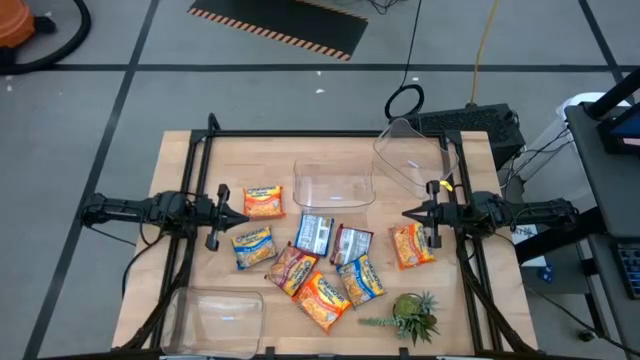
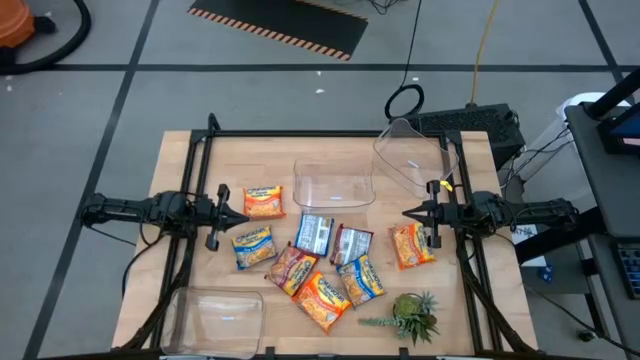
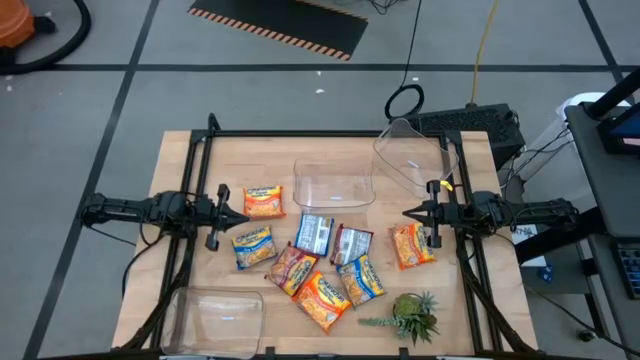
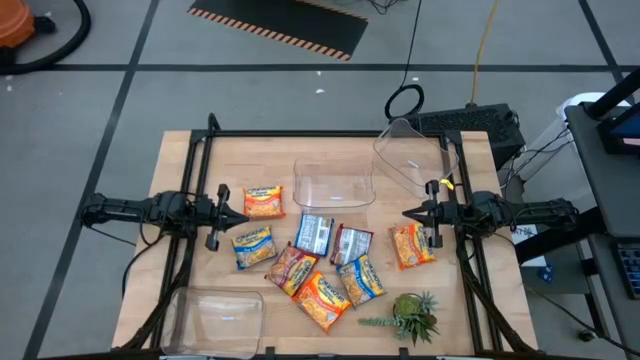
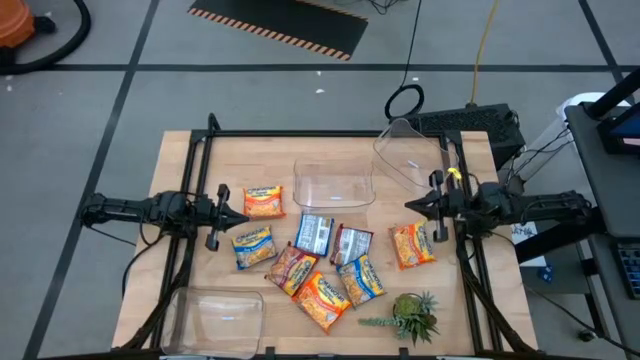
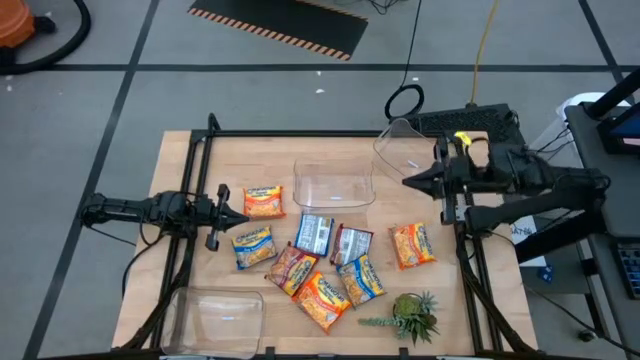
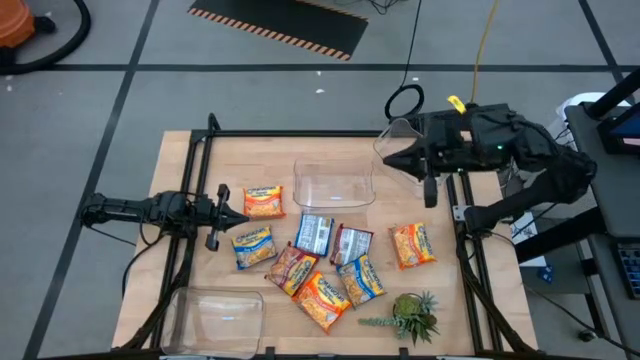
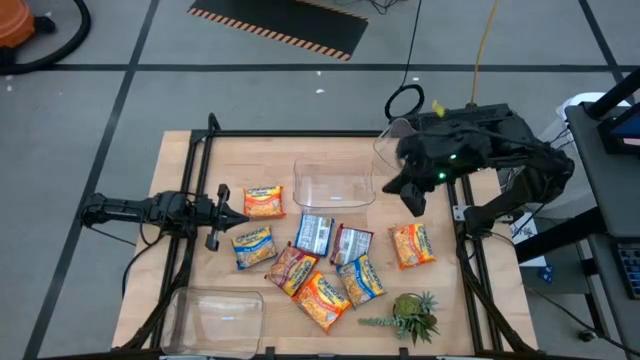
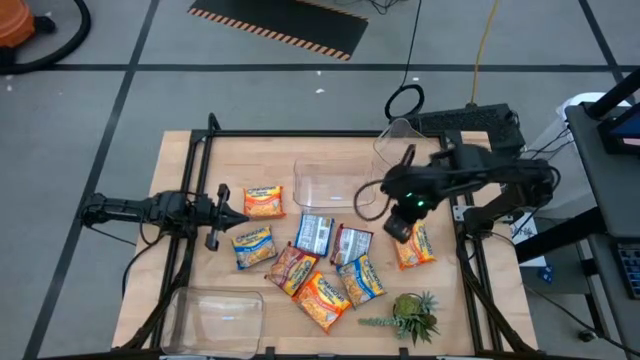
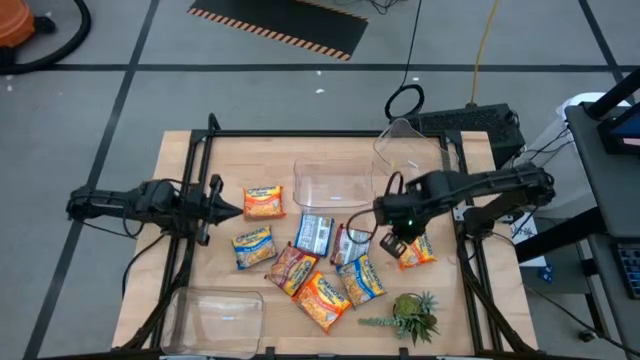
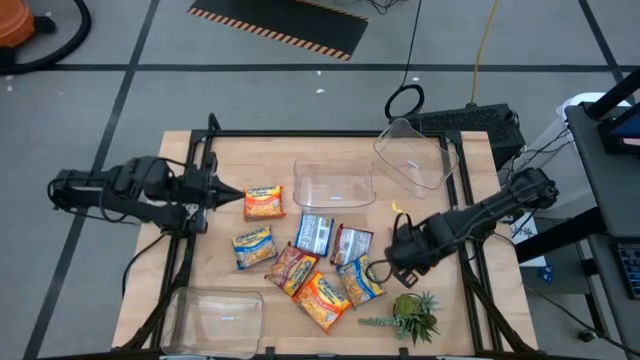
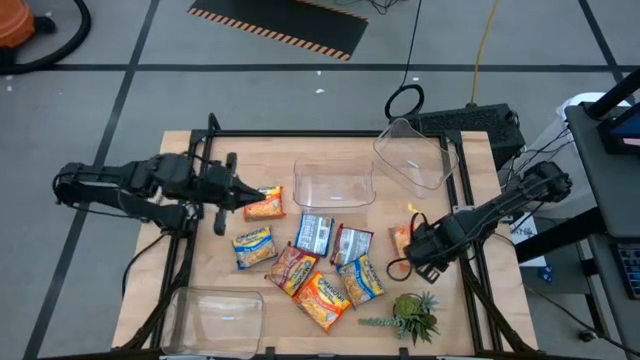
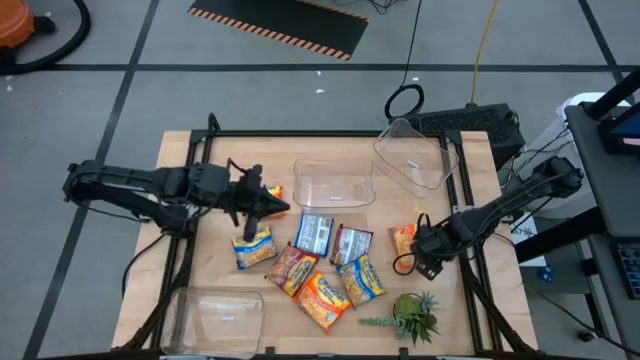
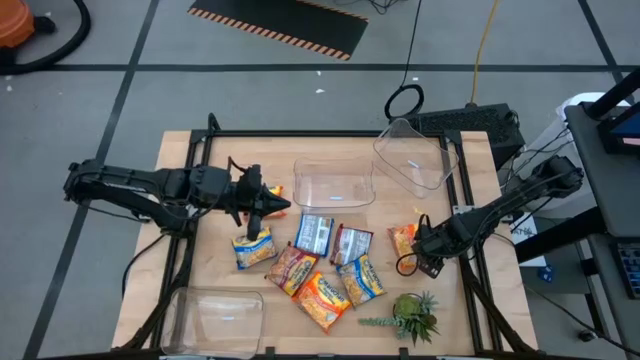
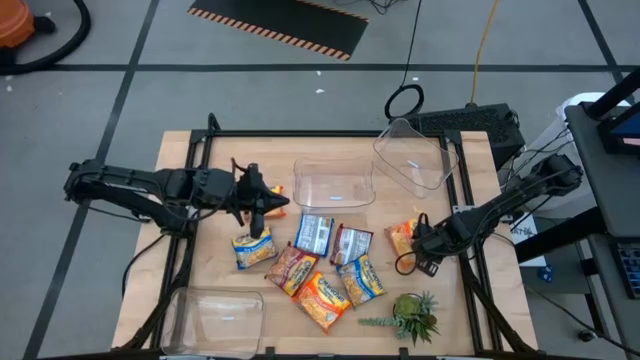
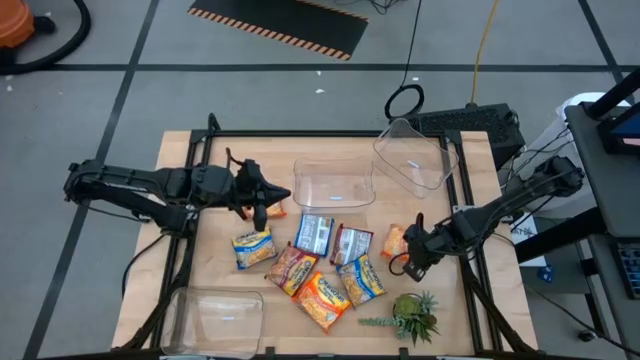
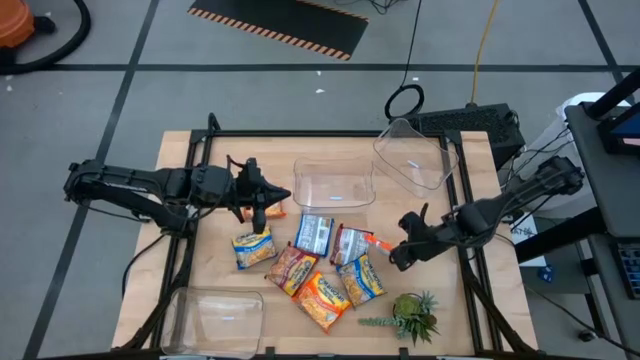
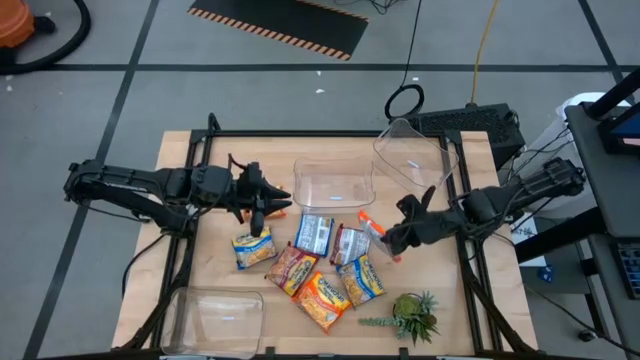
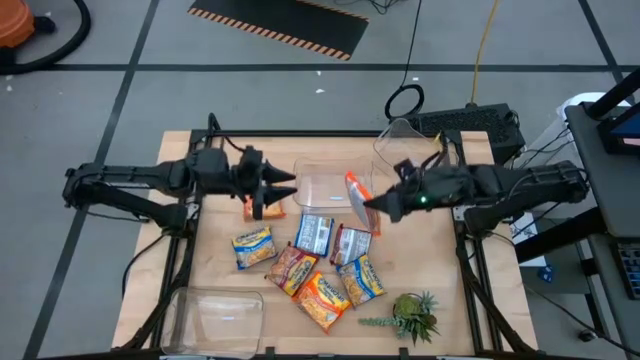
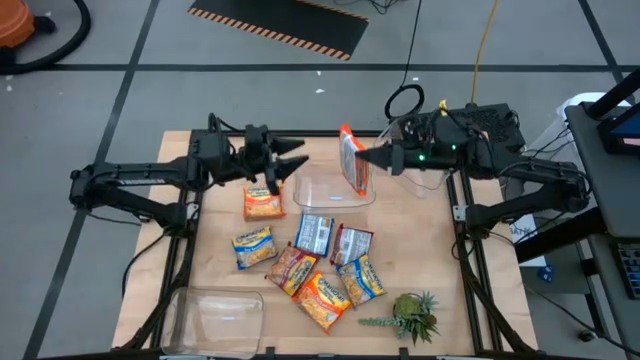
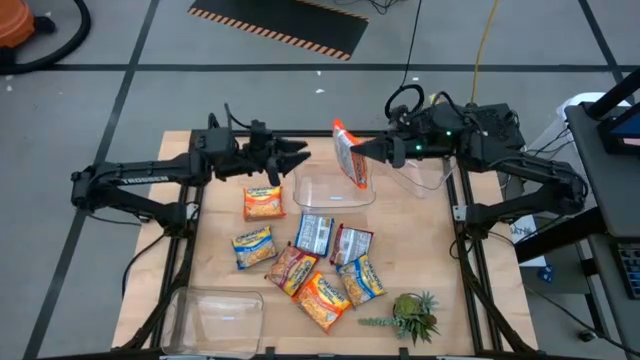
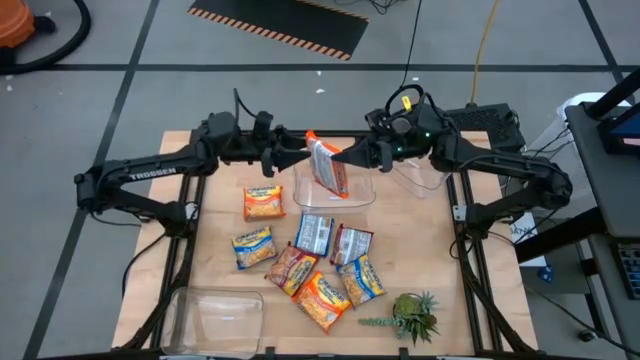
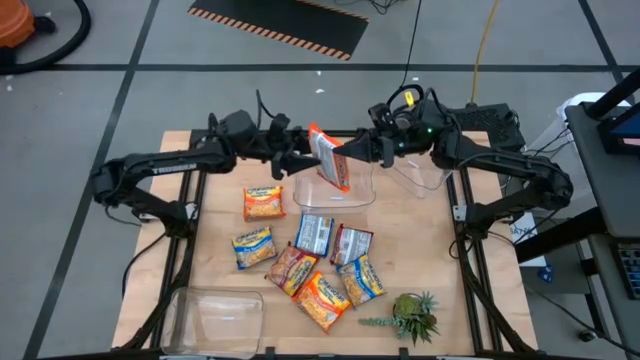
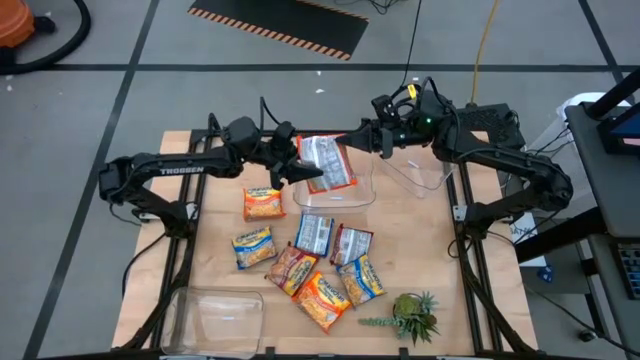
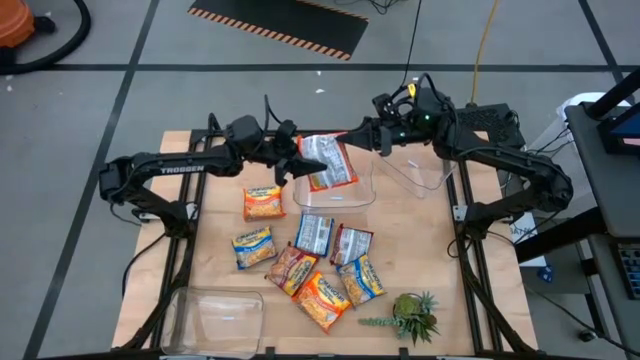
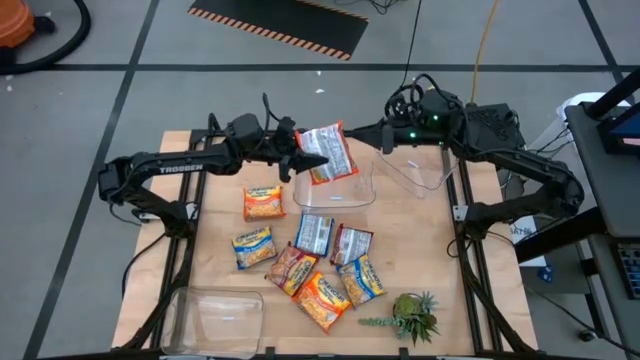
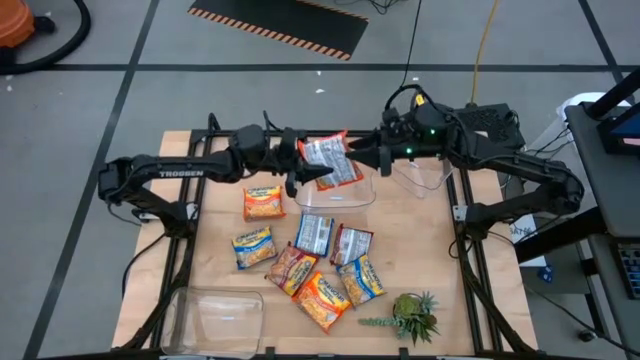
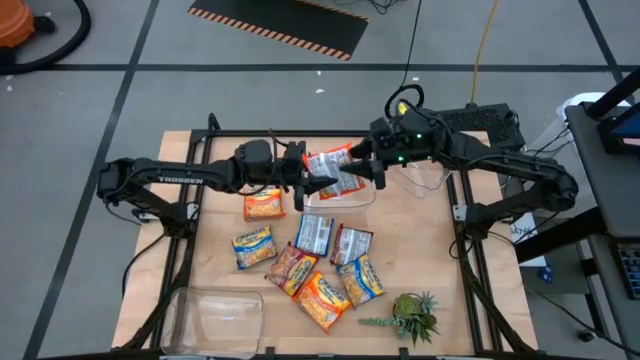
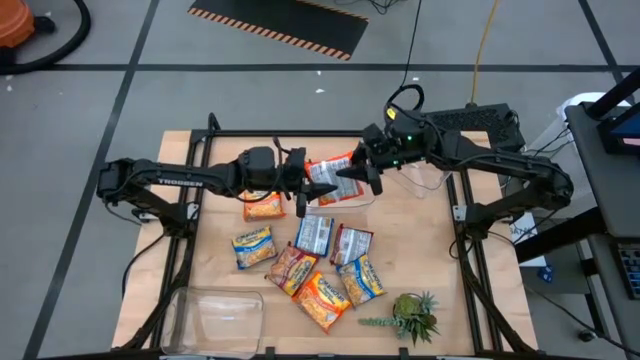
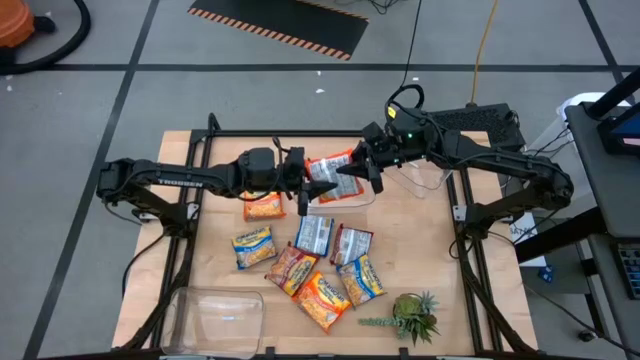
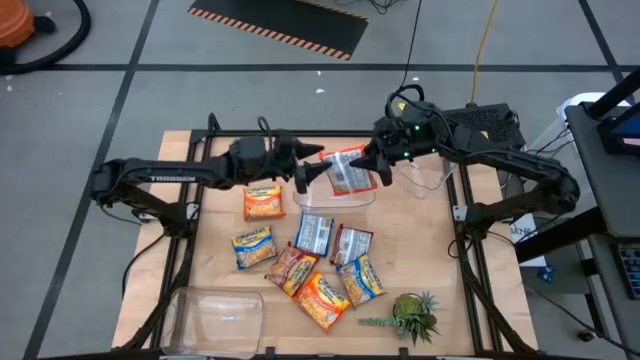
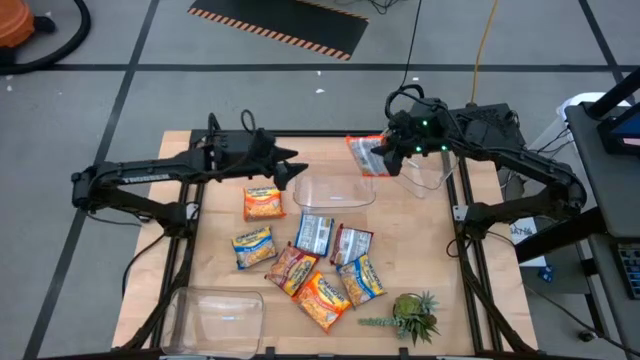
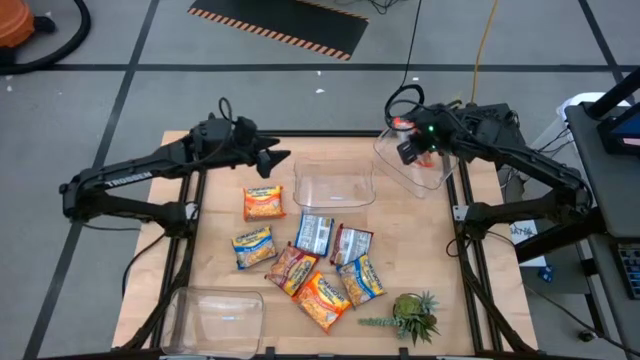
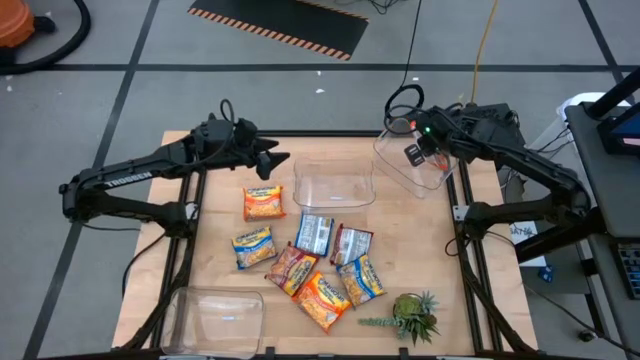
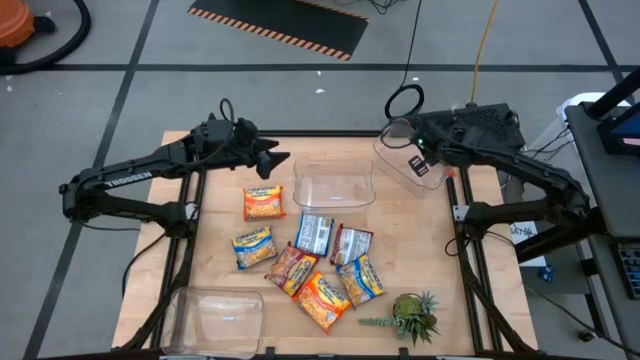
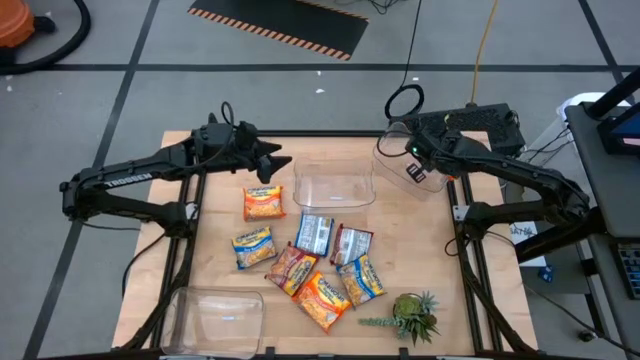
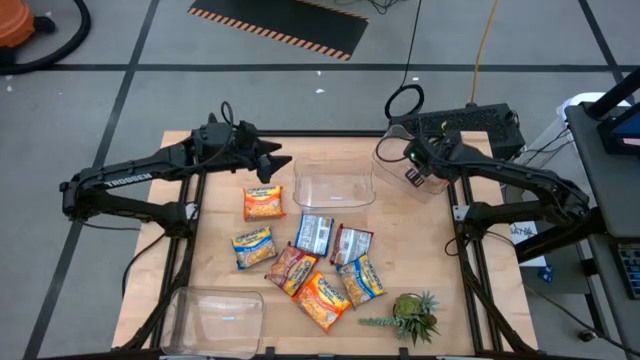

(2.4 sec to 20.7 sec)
Task: Sort Maruchan noodles
Put the right orange noodle pack into the top right transparent bin

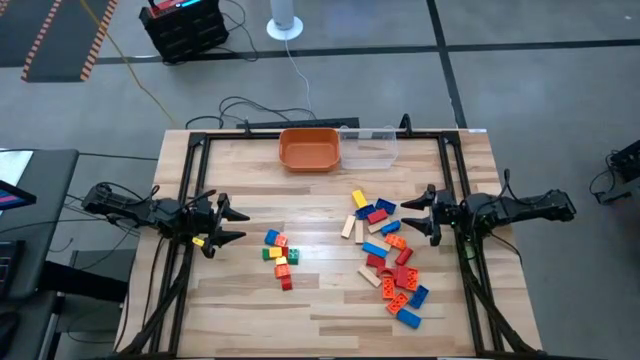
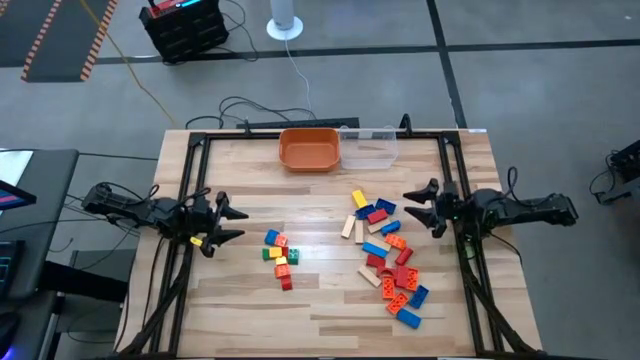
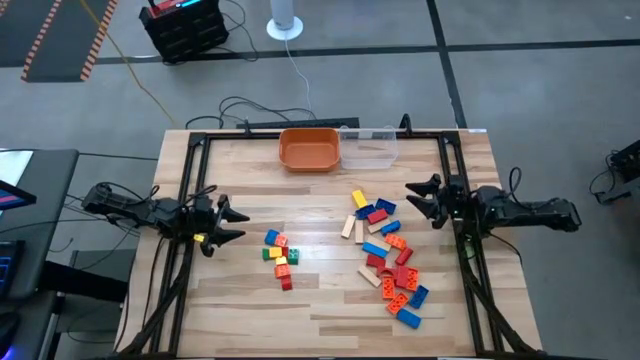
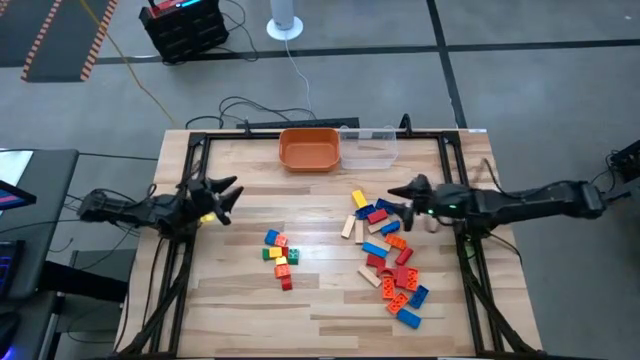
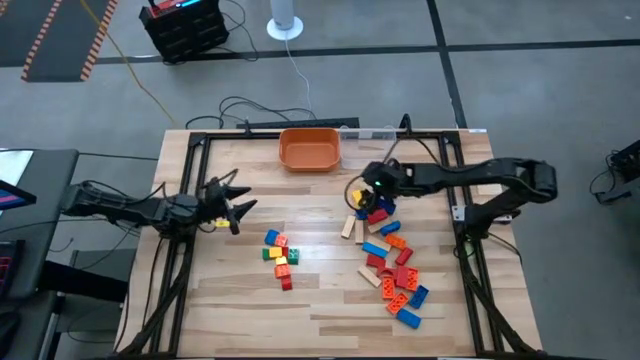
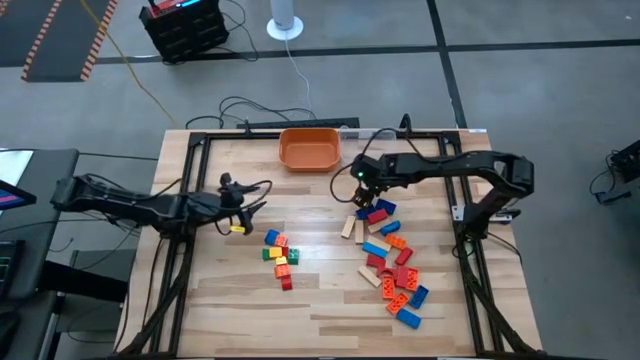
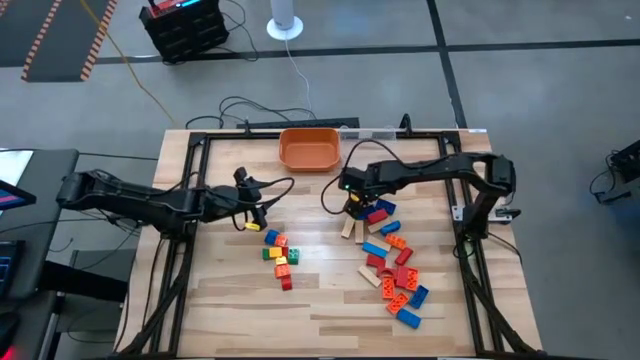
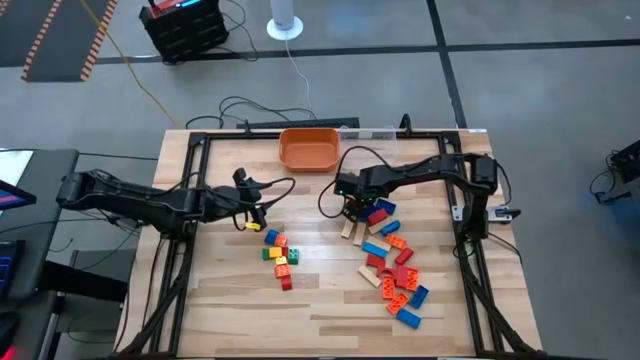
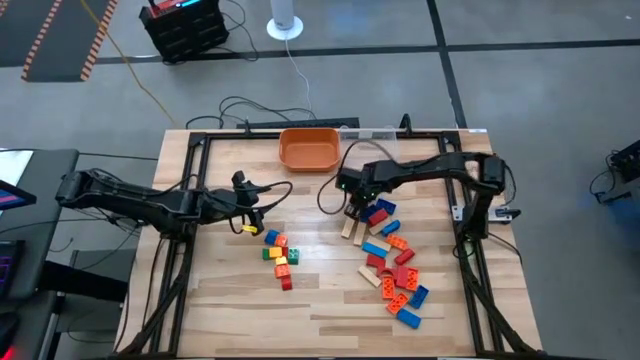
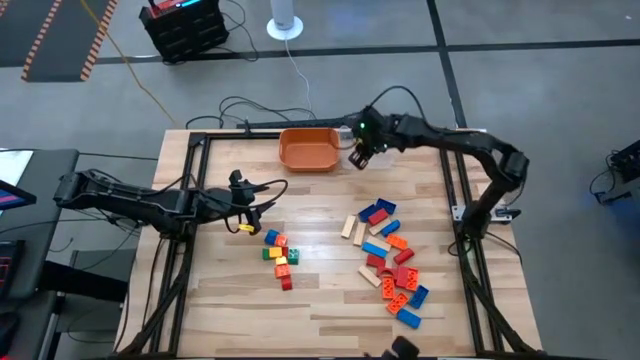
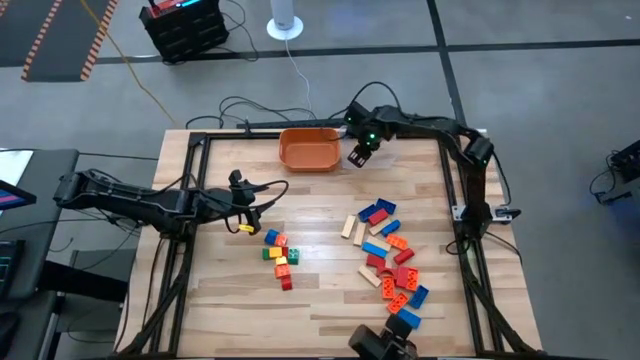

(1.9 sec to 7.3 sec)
Task: Sort blocks by size
Put the top yellow block into the transparent bin
